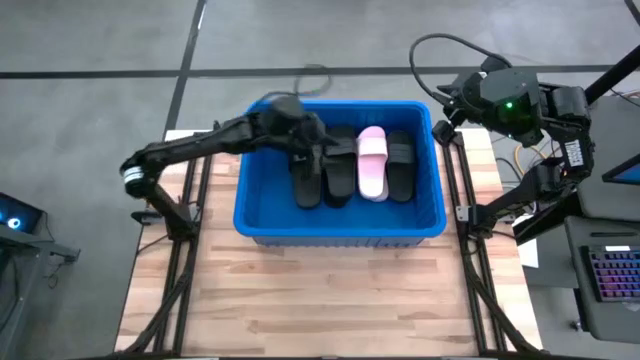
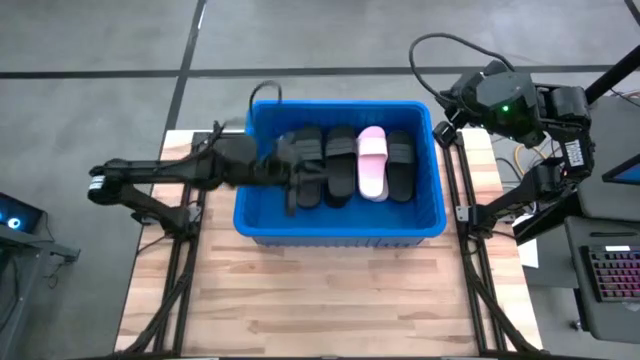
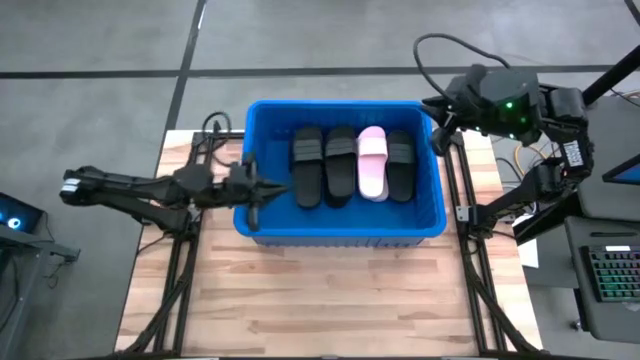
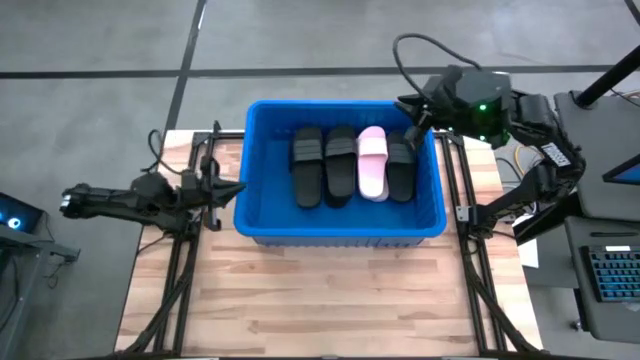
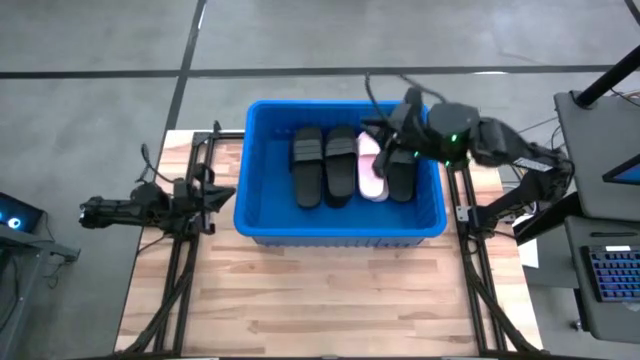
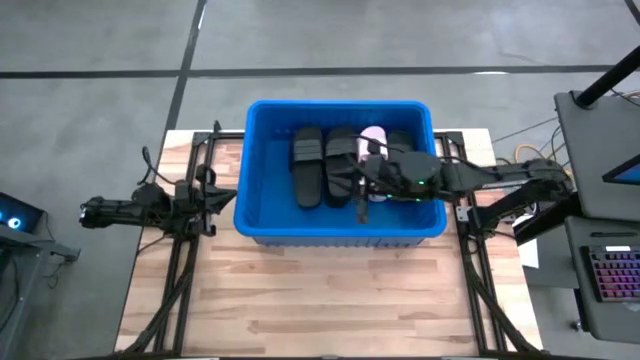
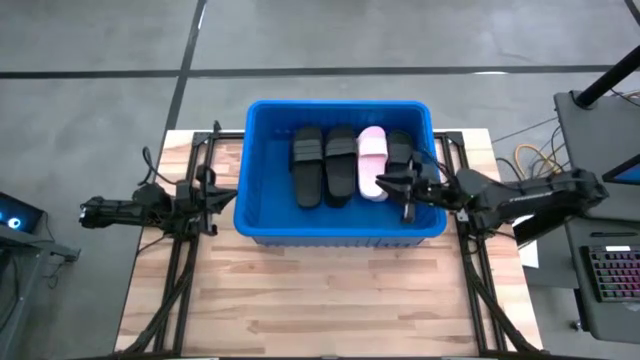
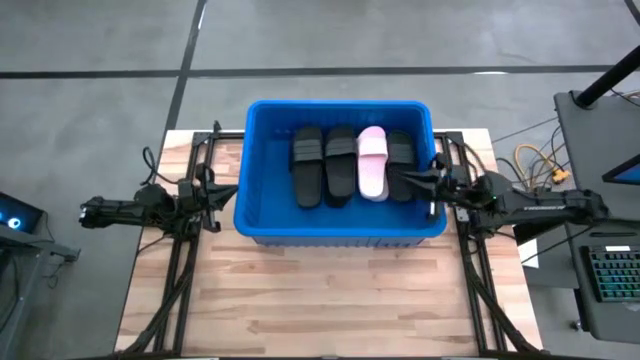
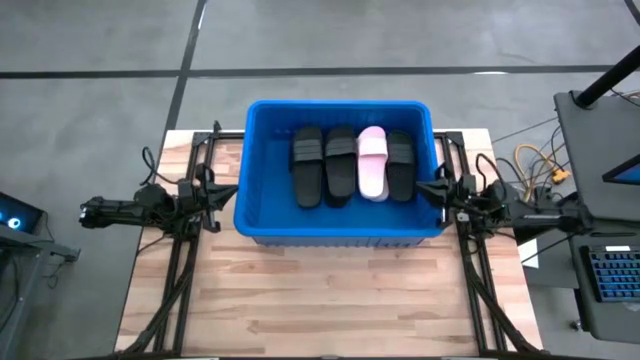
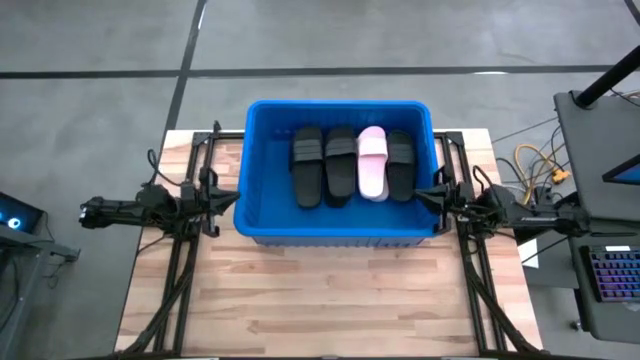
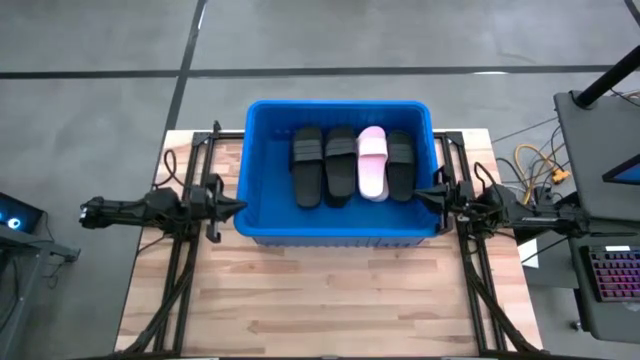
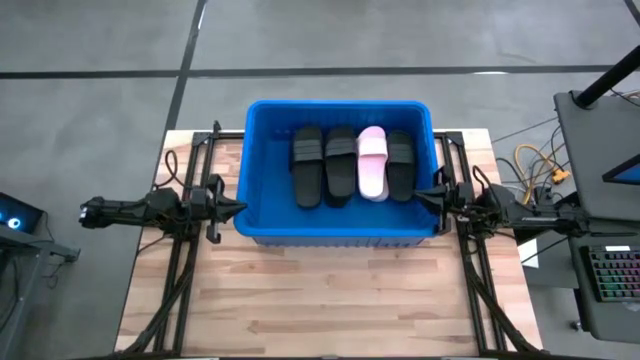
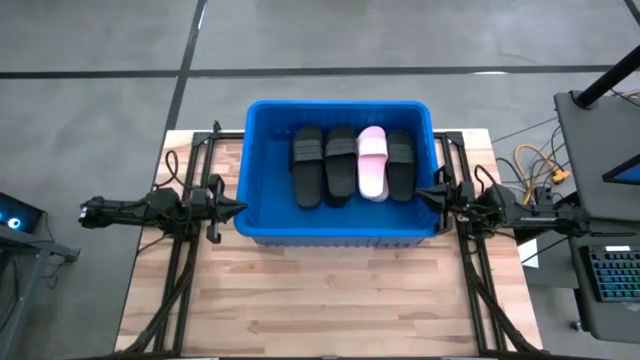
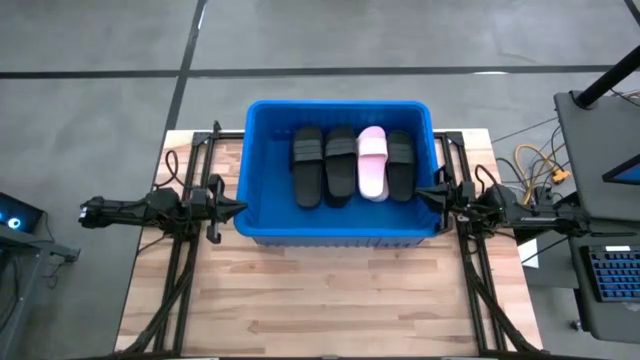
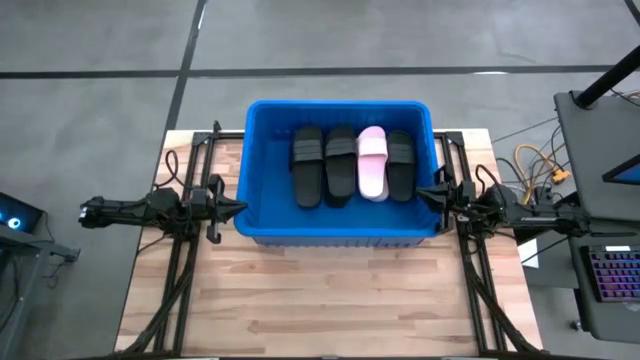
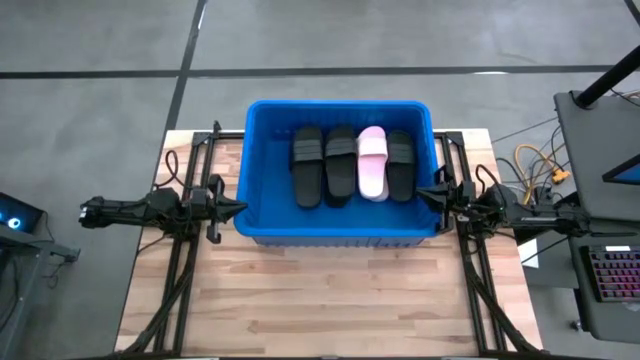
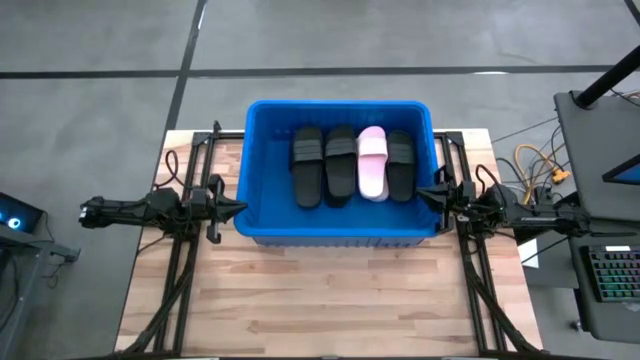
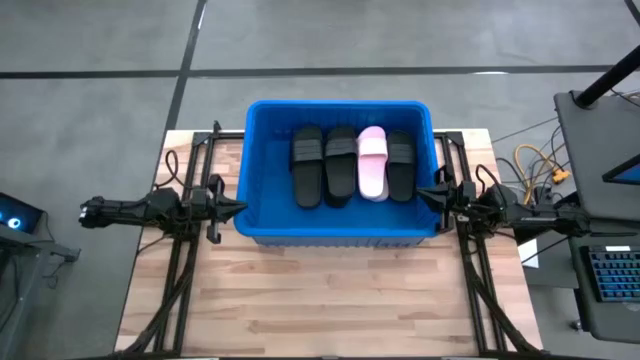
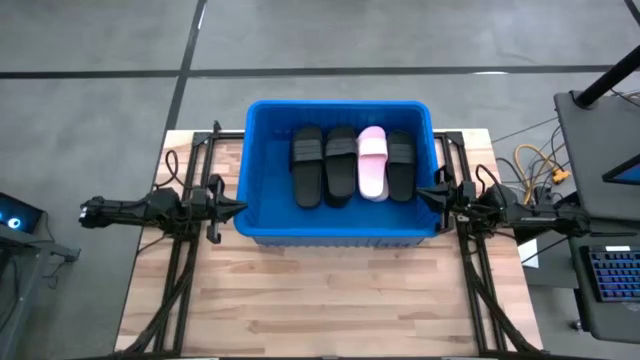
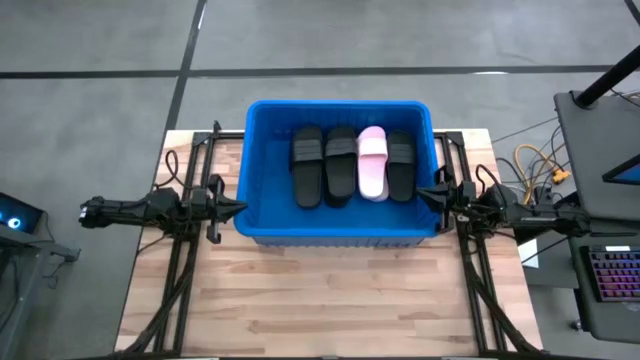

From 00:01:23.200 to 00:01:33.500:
Task: Pick and place slides into bin
Return to Home Position

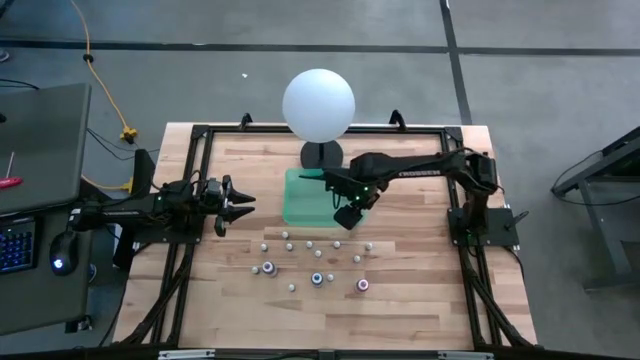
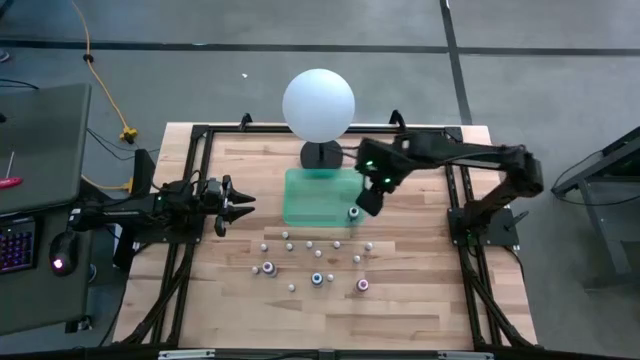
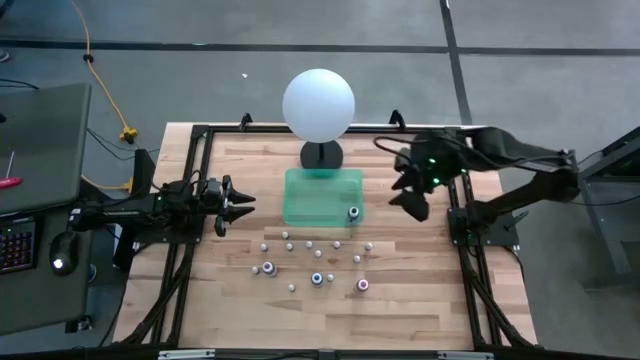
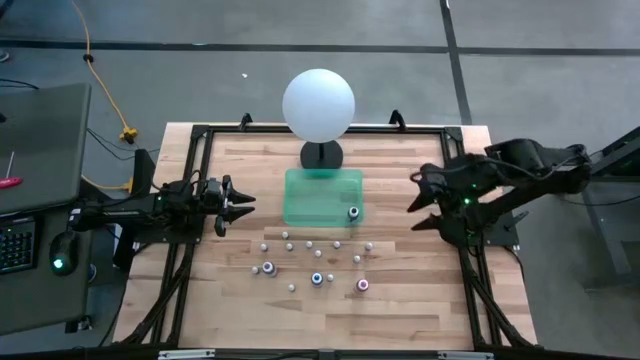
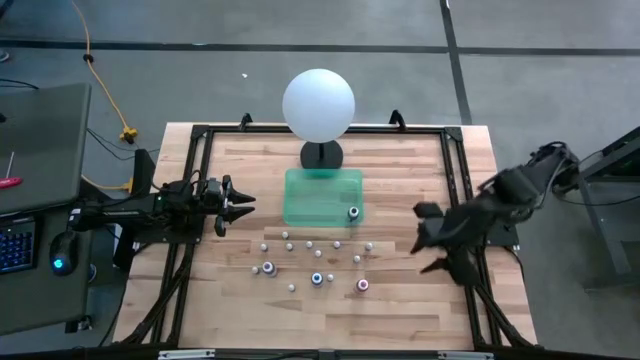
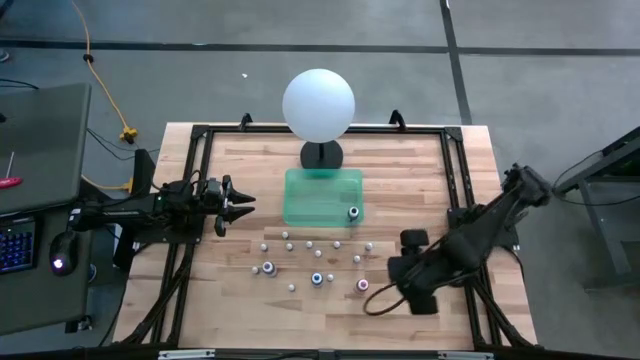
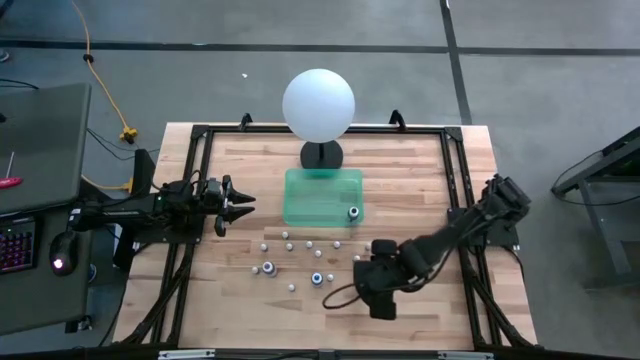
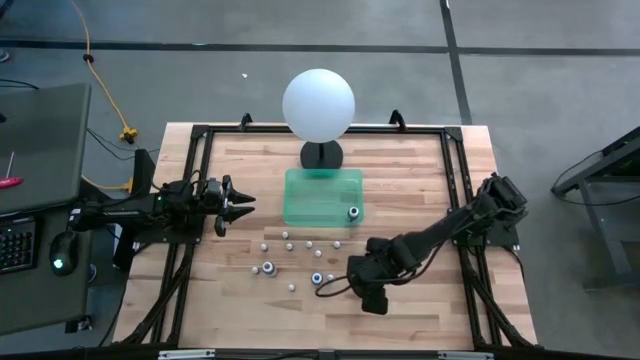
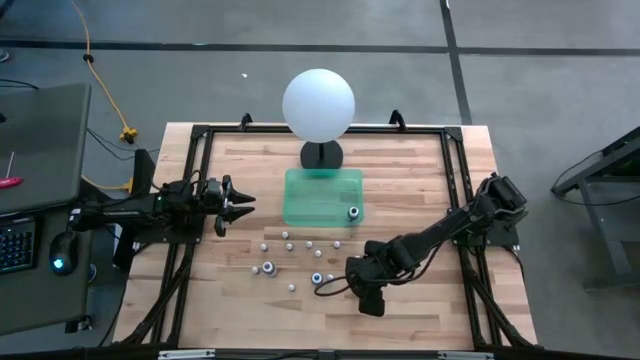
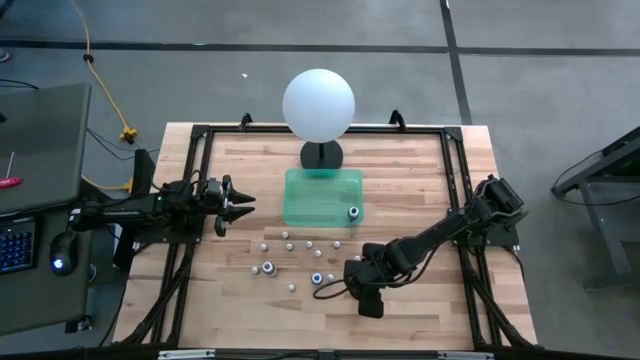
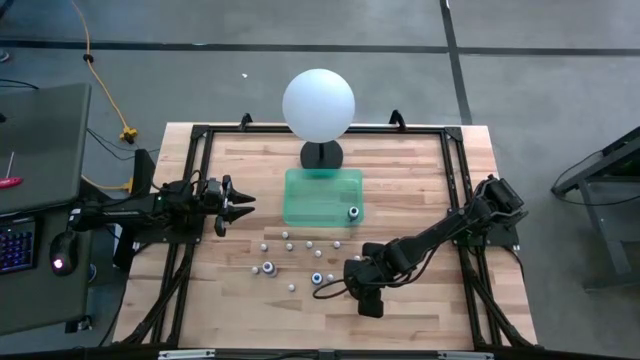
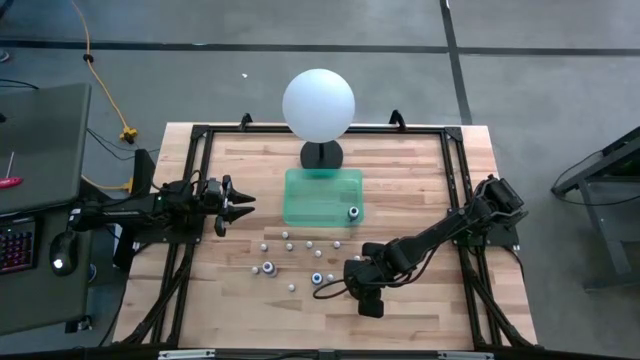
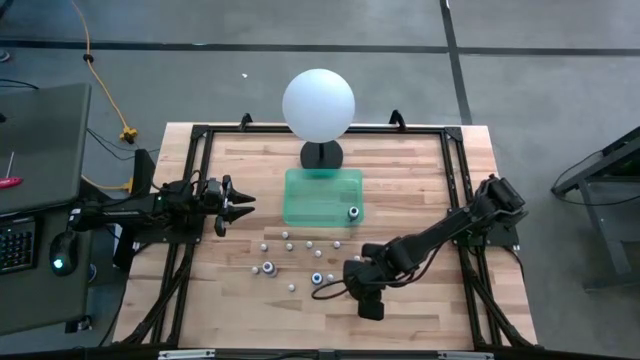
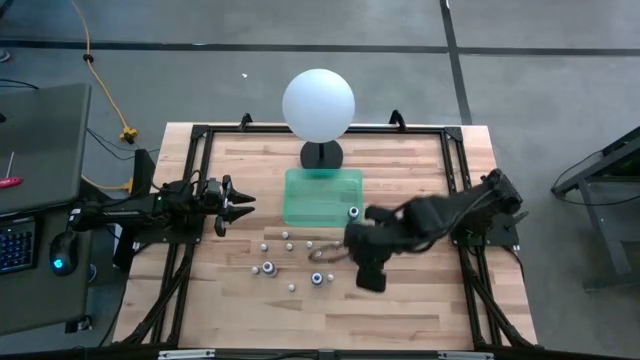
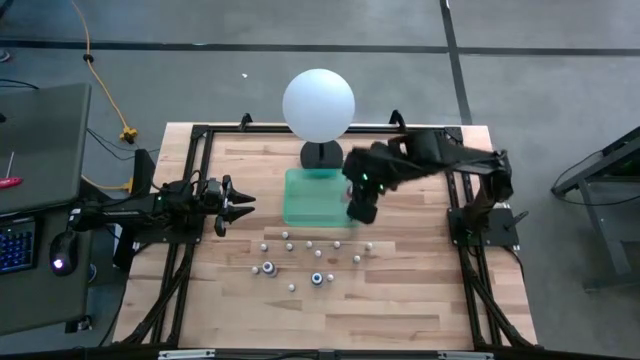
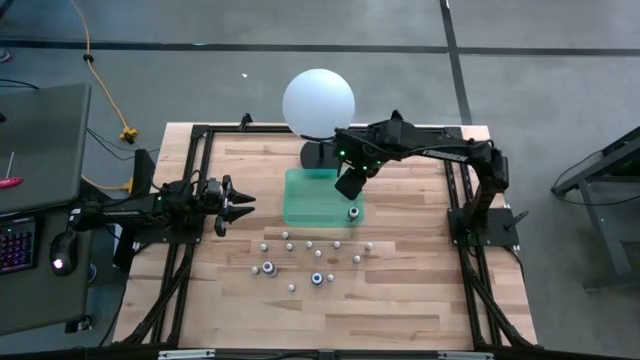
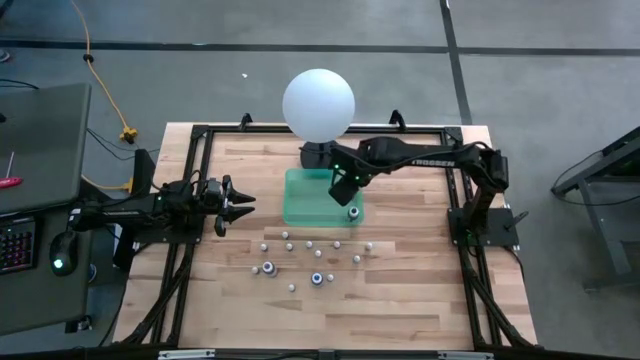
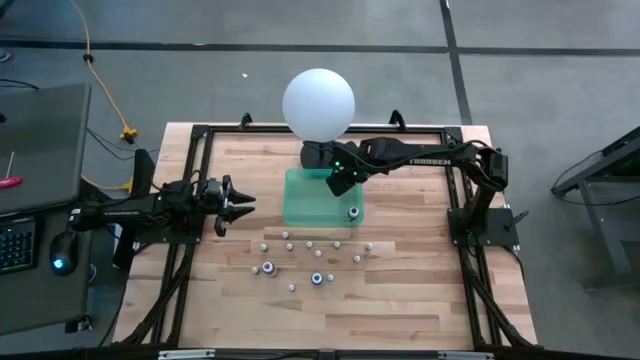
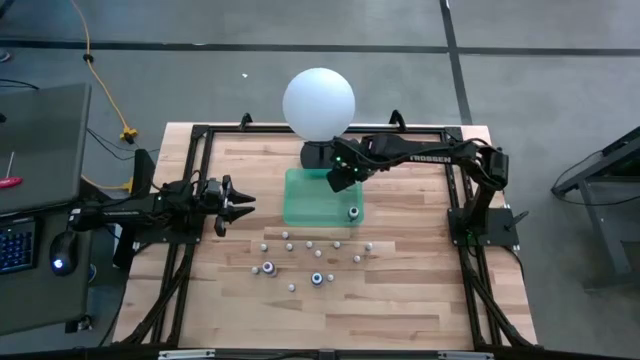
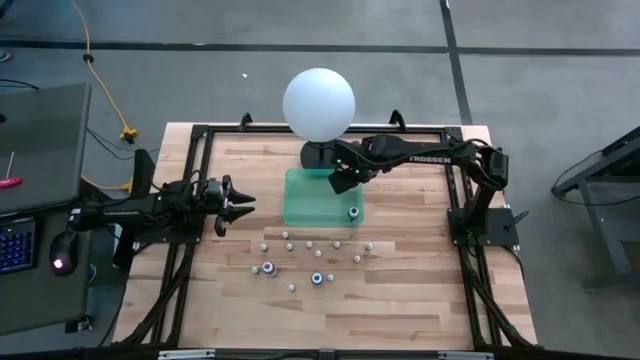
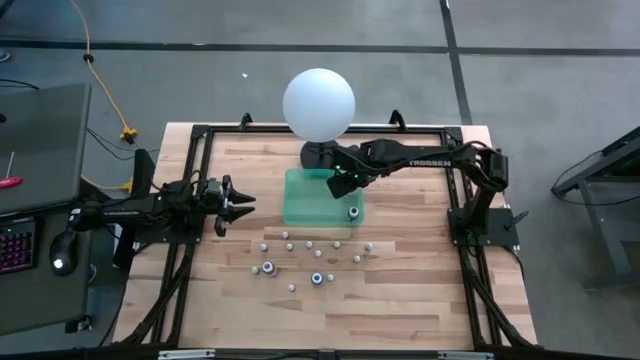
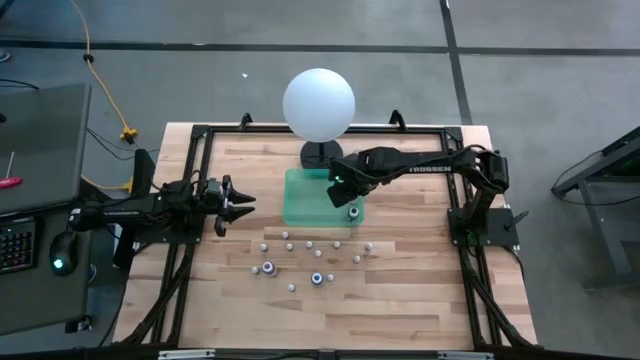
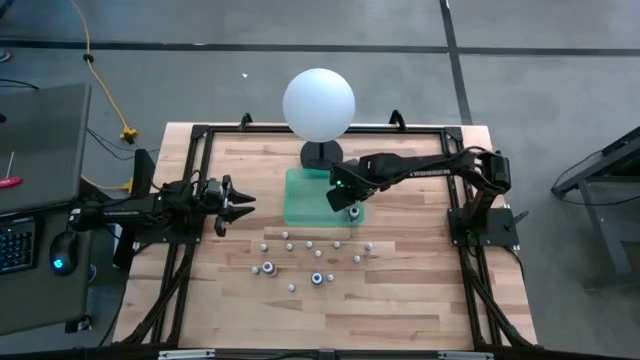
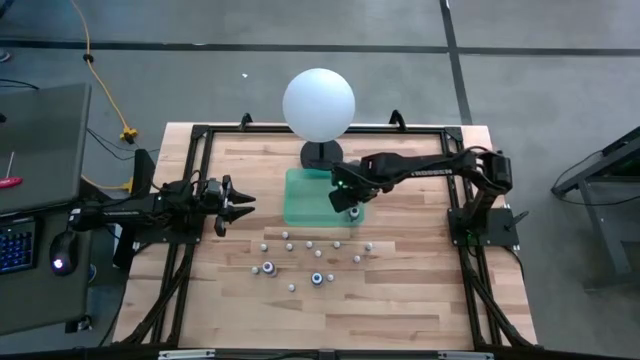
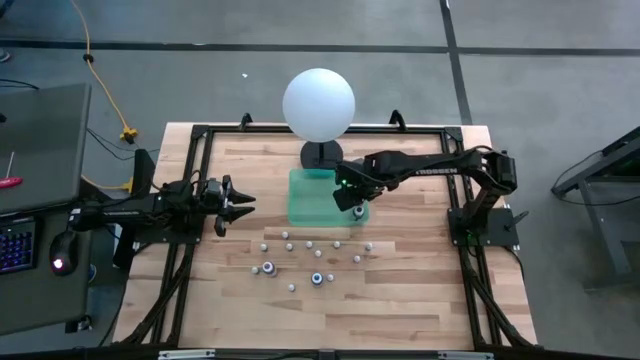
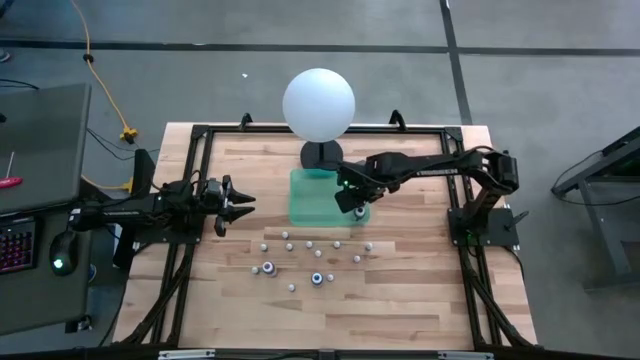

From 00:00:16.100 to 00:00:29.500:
Task: Pick & Place food coloring
Put the large pink food coloring bottle into the bin
